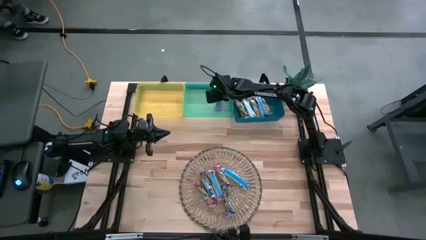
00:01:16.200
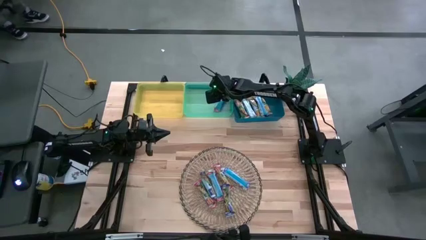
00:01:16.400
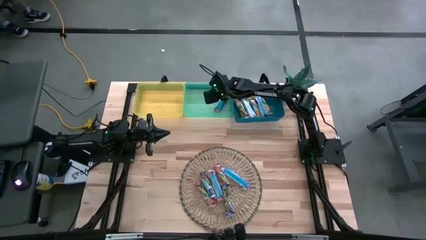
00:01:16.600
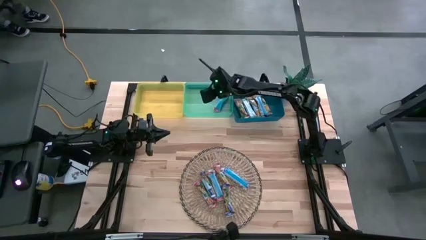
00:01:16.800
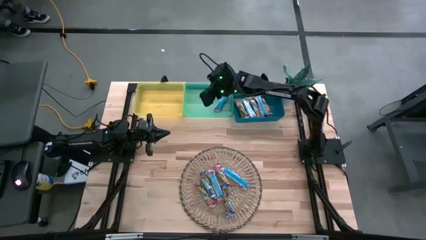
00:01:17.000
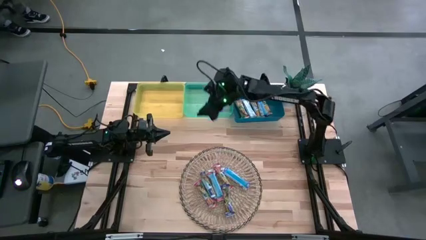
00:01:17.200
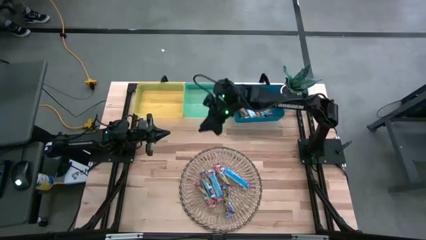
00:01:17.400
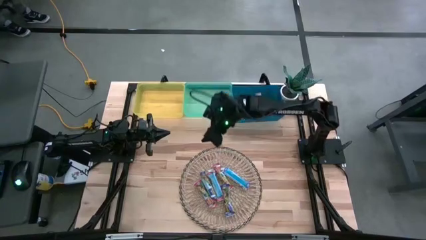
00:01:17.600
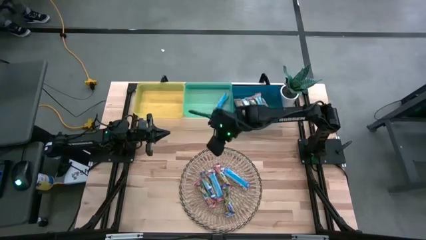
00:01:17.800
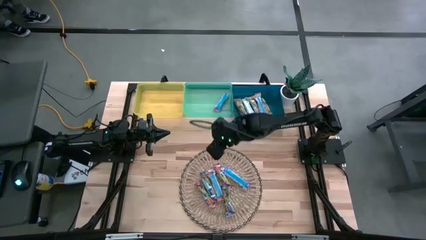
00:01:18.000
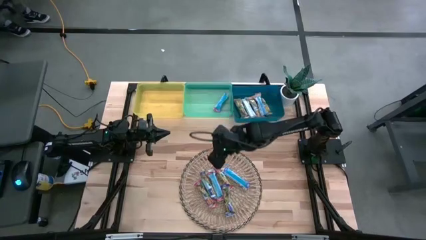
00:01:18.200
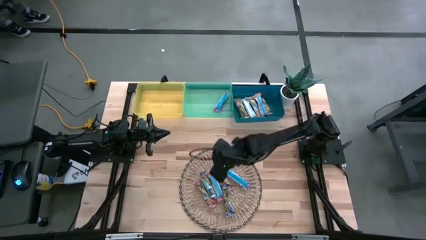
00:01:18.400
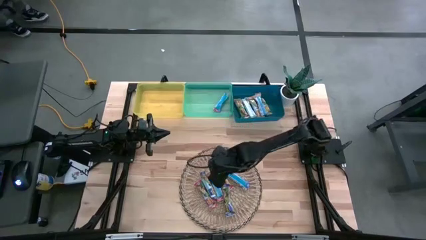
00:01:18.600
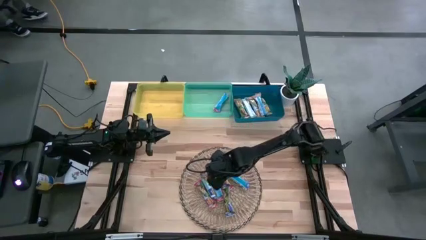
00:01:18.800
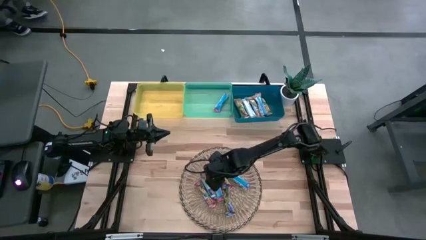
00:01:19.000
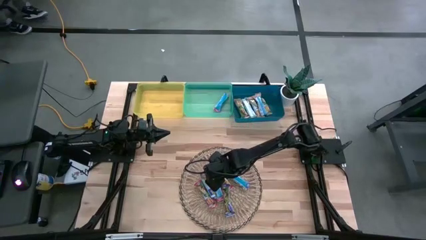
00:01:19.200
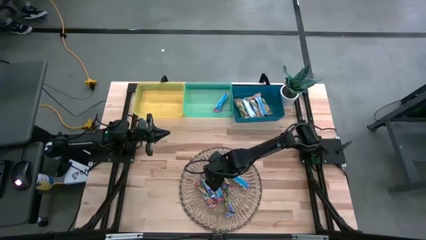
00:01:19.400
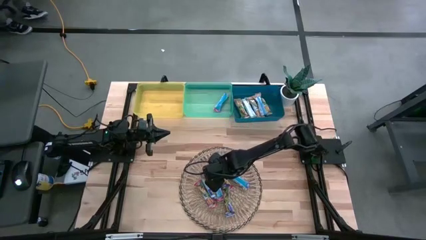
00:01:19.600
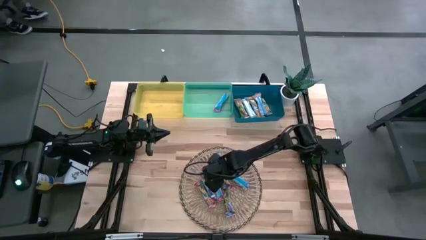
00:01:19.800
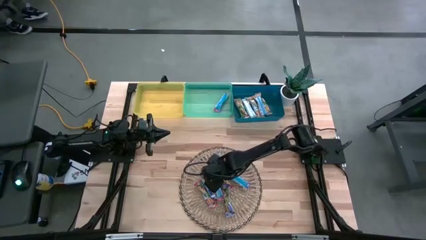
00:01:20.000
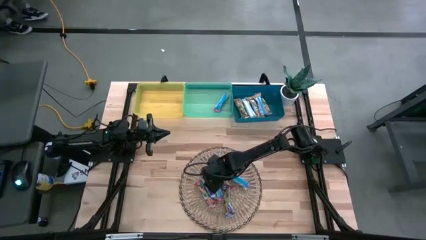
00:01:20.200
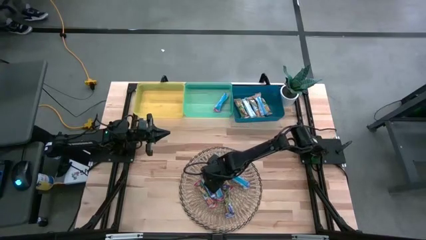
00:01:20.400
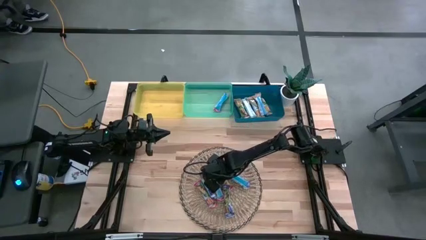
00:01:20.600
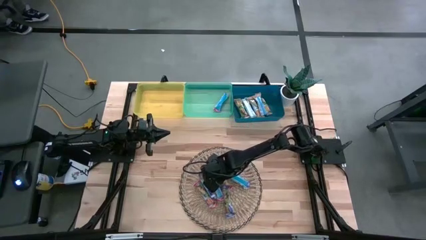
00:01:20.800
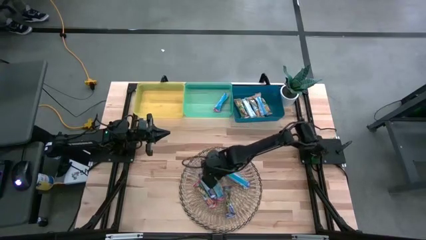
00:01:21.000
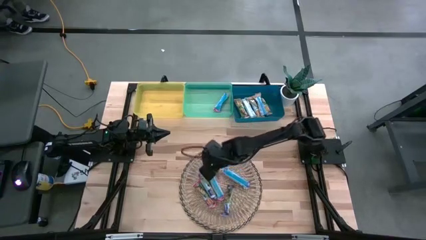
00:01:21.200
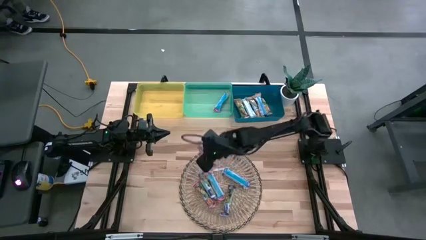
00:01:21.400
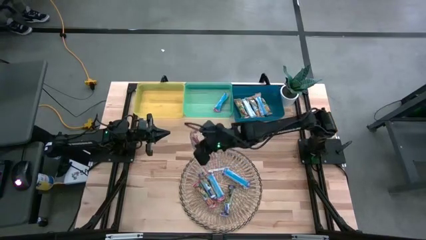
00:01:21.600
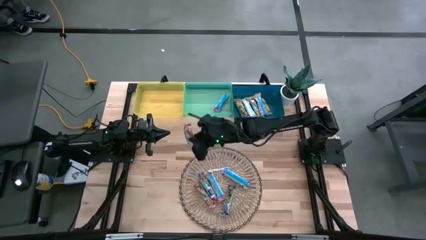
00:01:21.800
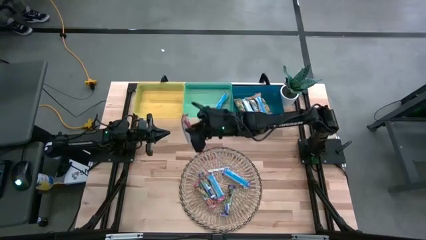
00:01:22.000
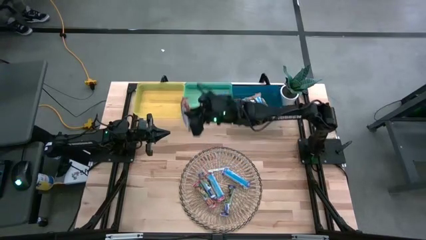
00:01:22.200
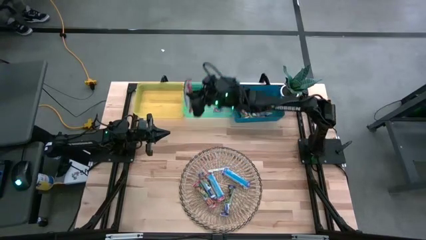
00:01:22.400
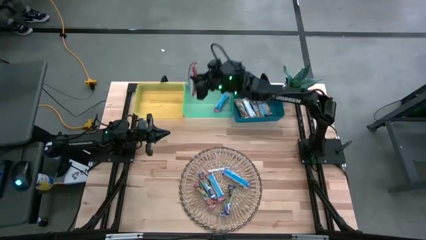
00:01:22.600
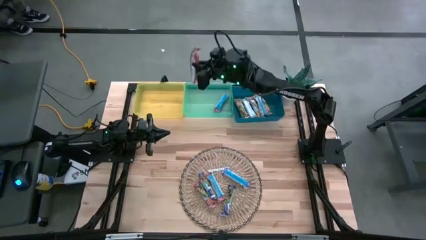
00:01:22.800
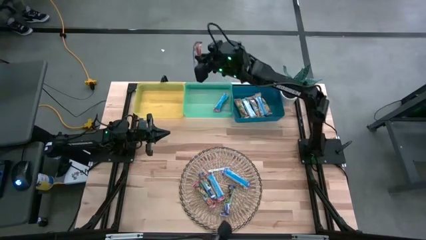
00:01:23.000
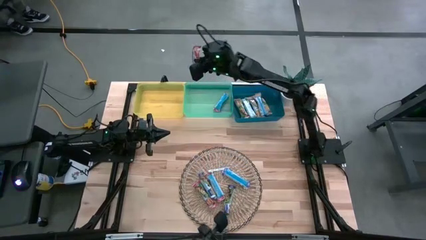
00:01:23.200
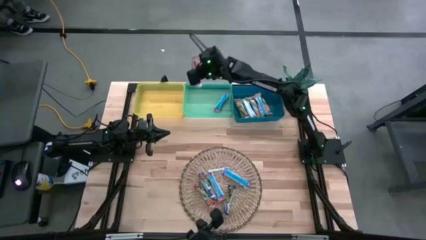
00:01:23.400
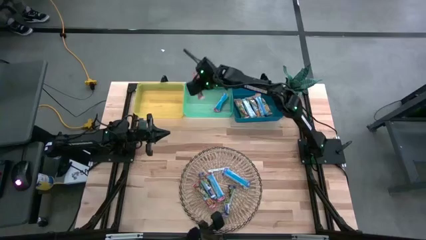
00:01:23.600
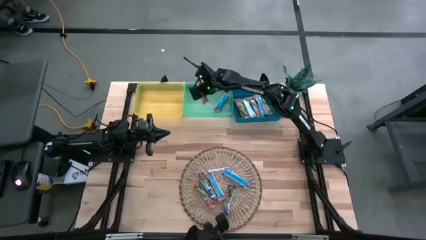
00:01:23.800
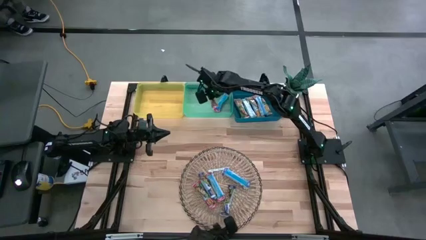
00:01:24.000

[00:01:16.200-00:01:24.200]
Task: Pick and place Granola Bars by type
Put the red granola bar into the light green bin

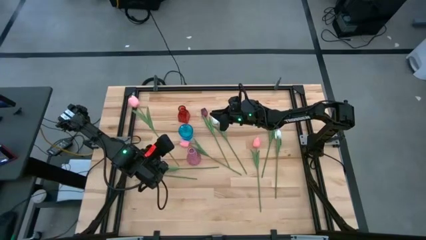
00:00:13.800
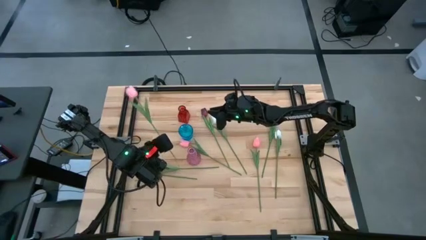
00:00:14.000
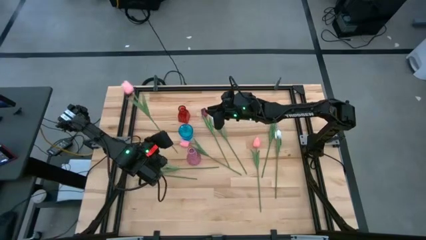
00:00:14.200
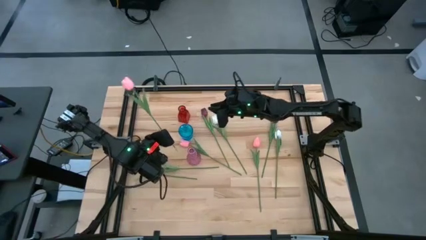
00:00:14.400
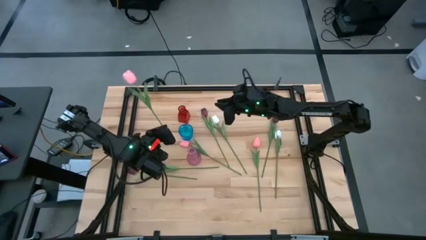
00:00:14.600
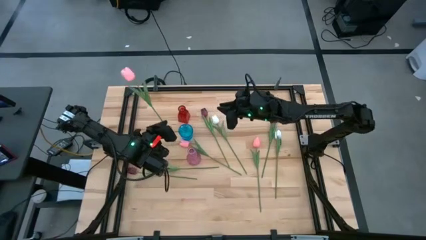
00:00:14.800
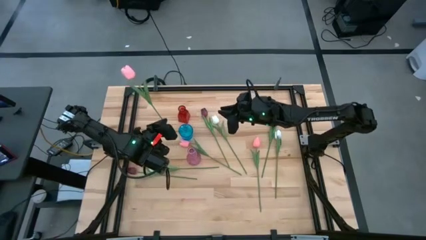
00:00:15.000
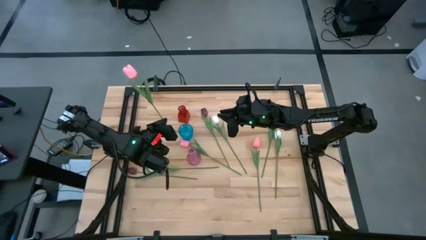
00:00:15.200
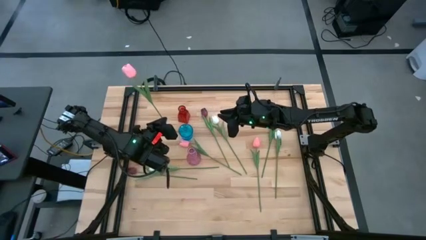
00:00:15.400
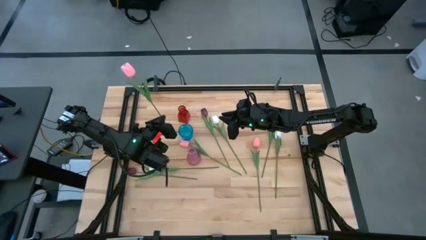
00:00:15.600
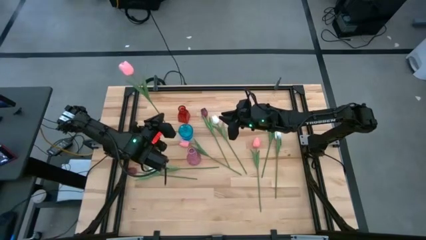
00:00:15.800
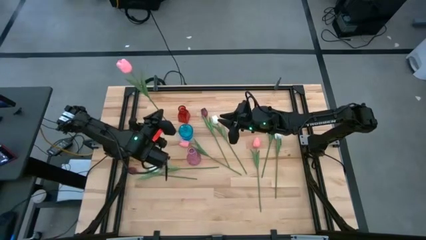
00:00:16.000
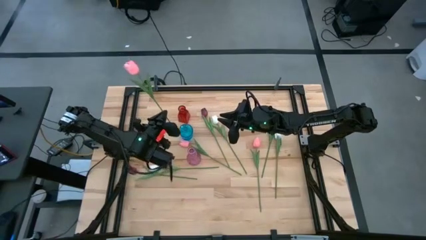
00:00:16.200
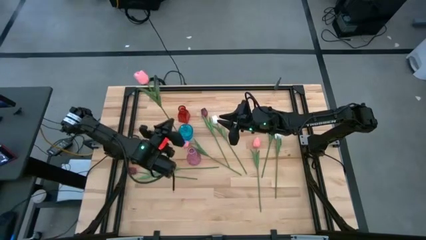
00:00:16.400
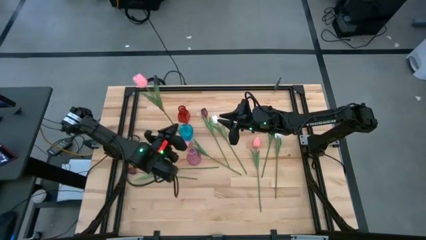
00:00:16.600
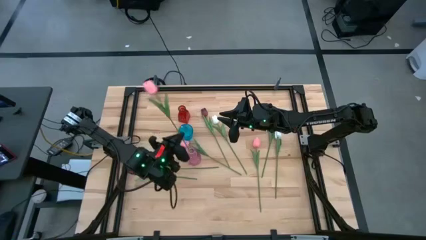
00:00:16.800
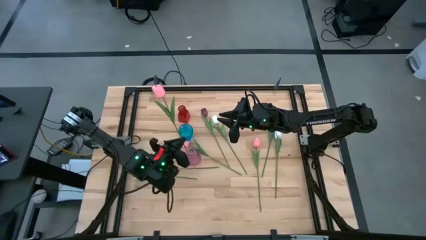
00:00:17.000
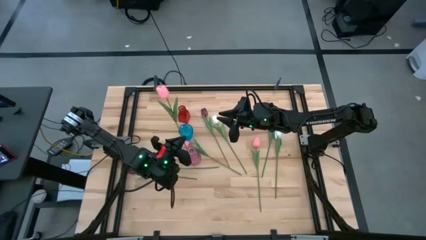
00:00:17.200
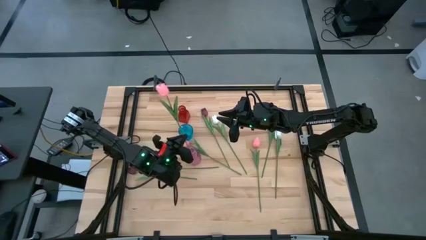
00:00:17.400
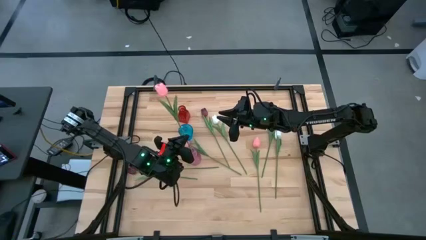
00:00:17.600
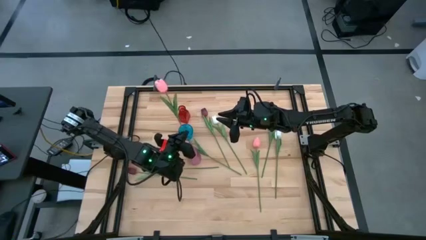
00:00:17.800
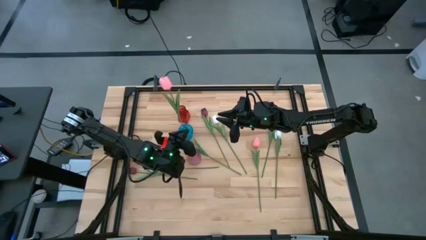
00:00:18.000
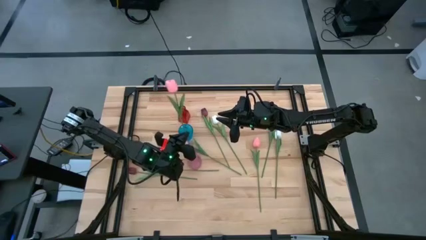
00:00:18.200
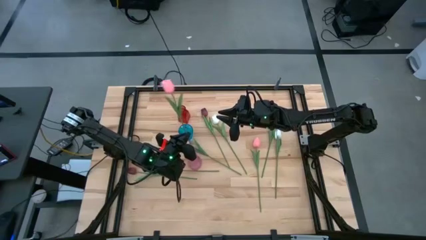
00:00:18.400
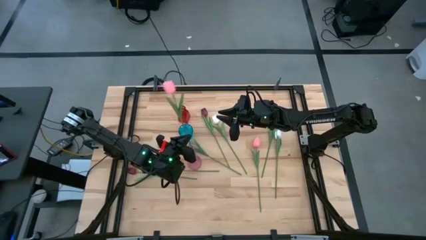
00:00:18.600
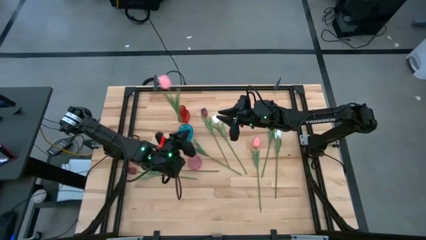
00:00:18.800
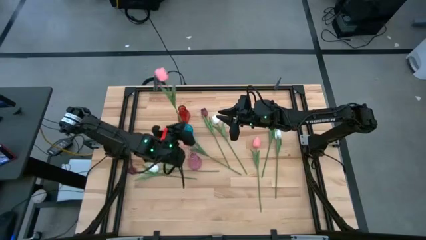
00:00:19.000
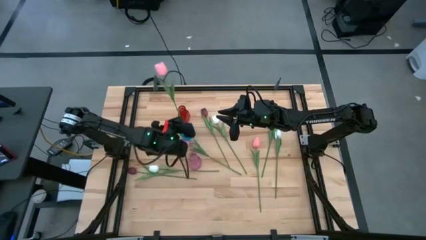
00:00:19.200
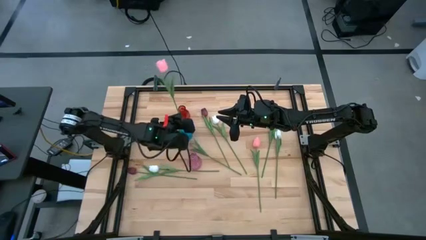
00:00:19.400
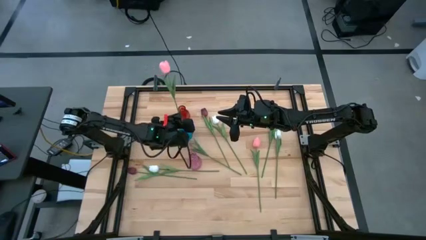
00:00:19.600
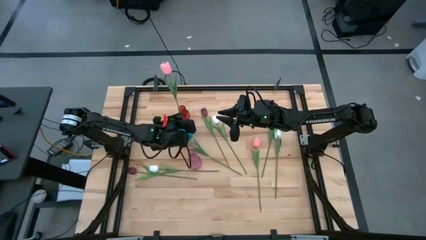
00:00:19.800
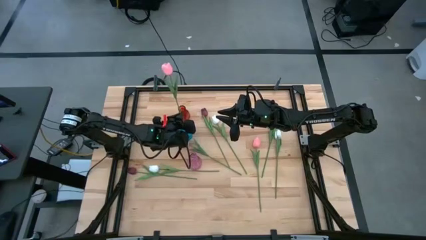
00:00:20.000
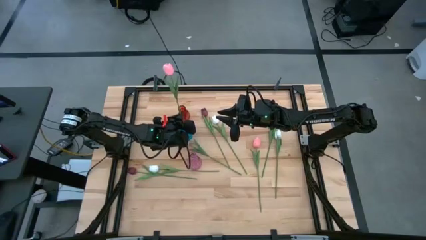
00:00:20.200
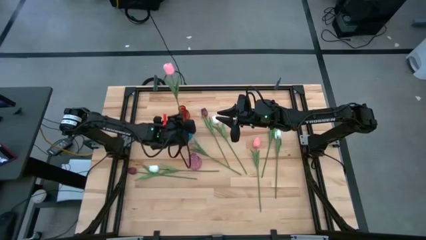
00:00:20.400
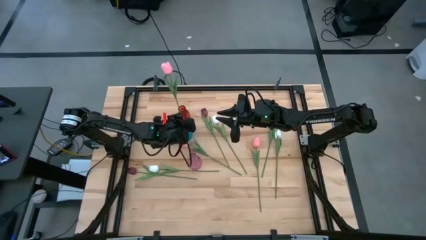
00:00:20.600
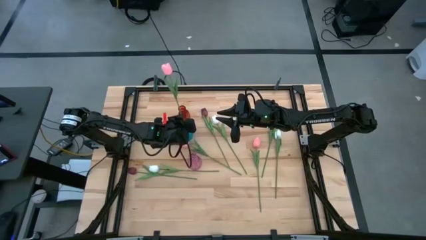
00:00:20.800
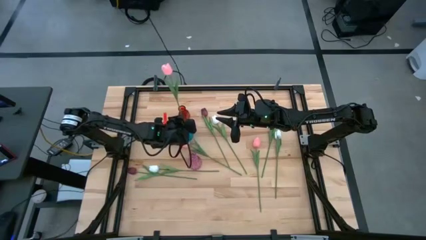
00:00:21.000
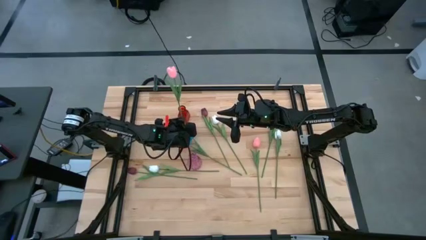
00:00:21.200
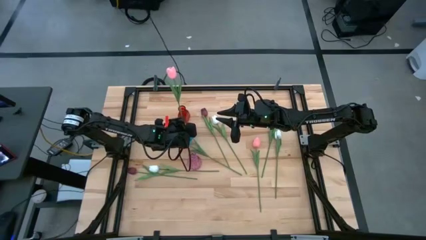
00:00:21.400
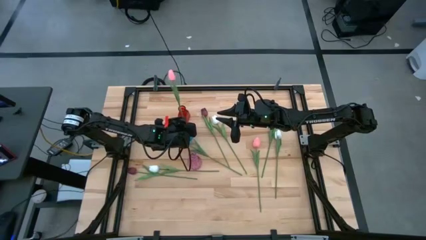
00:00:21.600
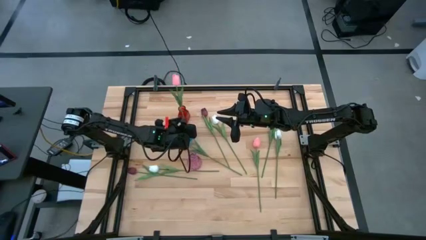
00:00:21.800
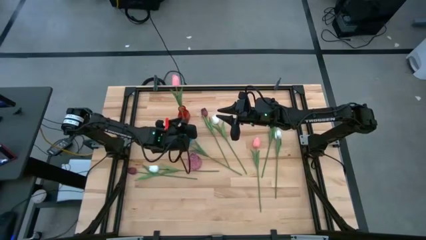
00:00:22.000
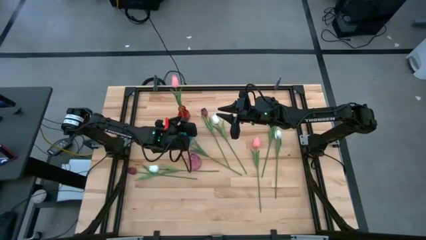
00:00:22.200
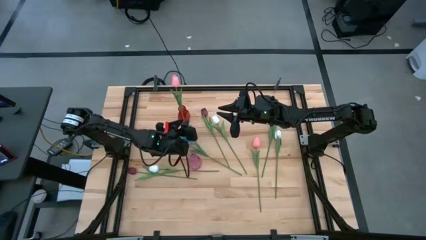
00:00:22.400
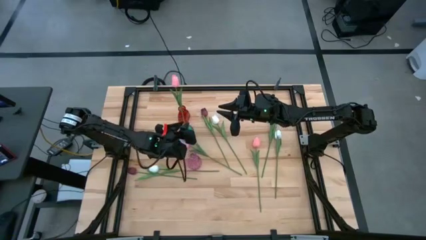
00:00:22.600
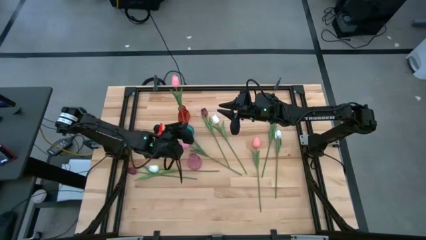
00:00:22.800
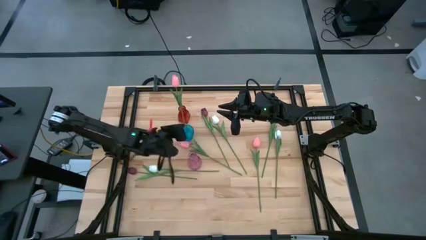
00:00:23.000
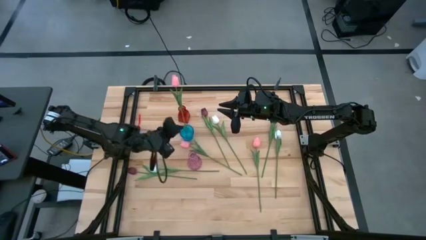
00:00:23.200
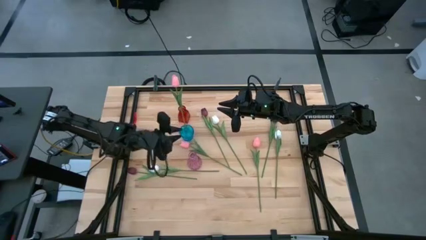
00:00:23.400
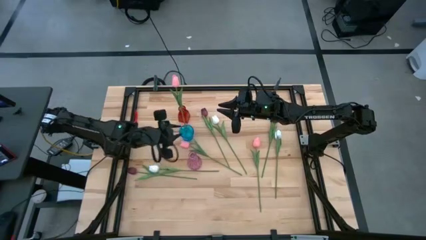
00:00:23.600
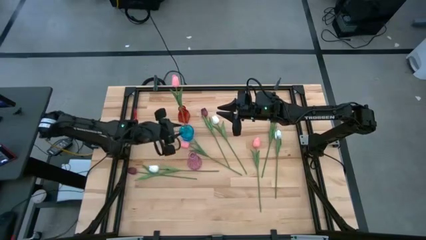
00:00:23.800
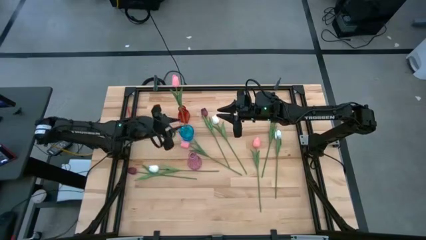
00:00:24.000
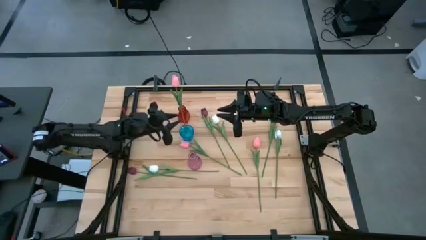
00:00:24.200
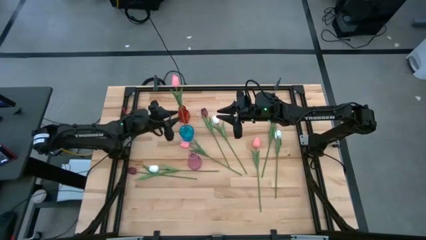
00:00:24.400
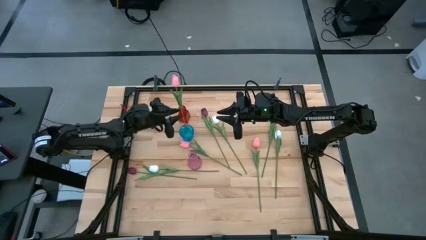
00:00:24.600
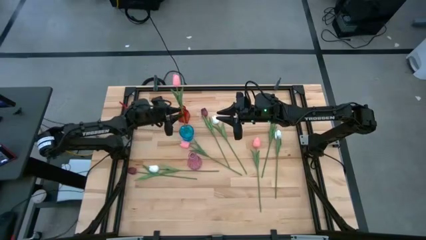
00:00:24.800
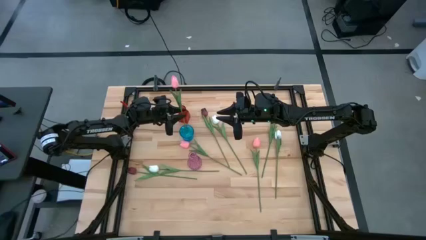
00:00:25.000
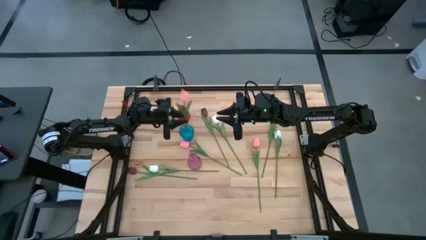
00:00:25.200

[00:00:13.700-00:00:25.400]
Task: Sort flowers into vase by color
Put the left pink flower into the blue vase
